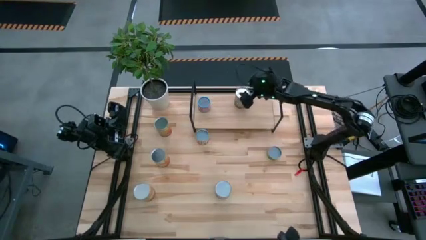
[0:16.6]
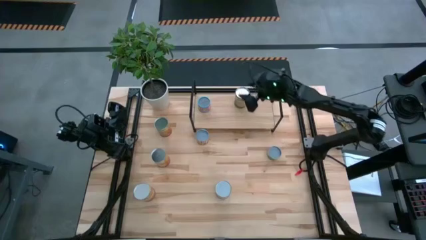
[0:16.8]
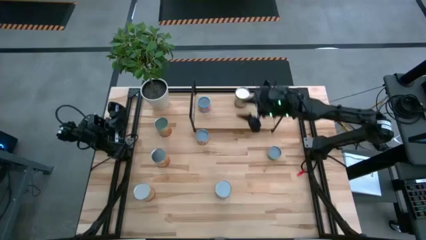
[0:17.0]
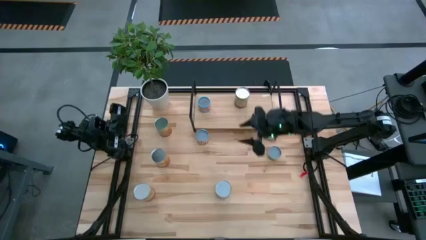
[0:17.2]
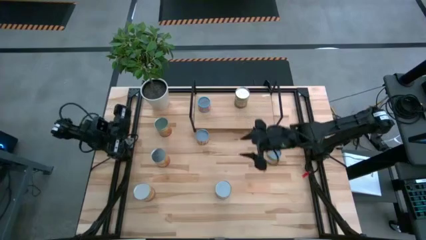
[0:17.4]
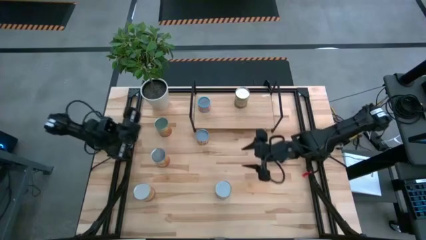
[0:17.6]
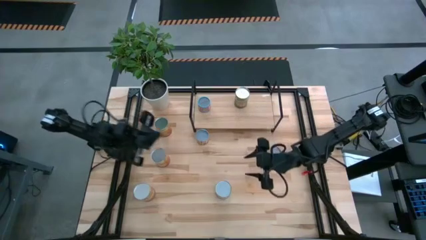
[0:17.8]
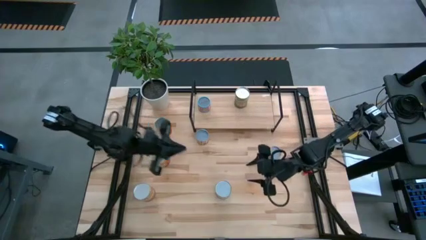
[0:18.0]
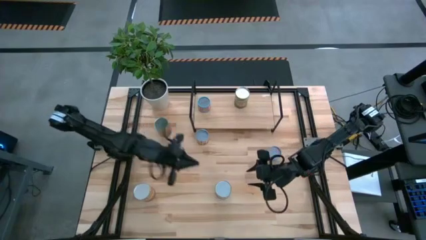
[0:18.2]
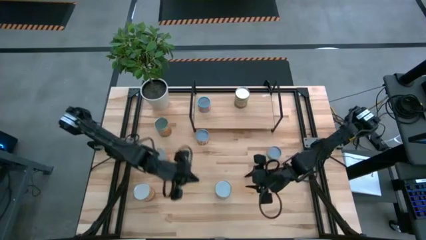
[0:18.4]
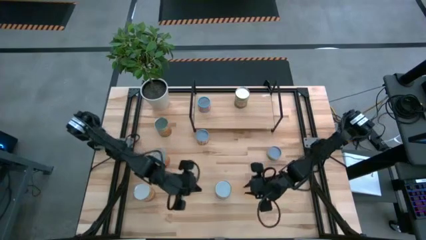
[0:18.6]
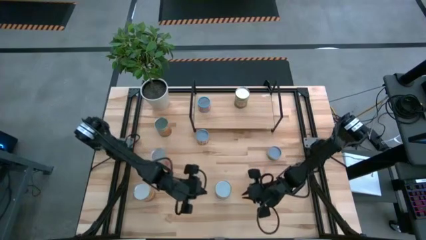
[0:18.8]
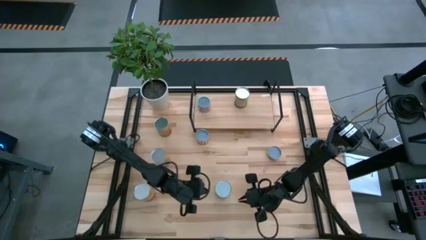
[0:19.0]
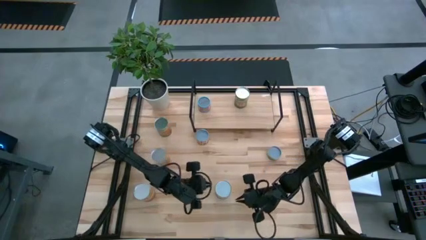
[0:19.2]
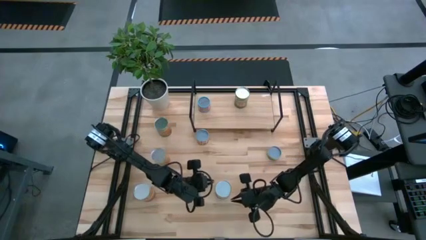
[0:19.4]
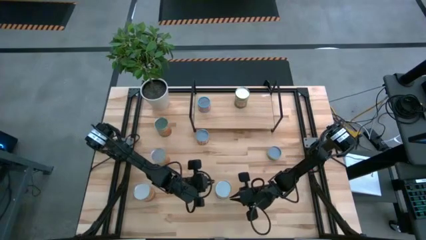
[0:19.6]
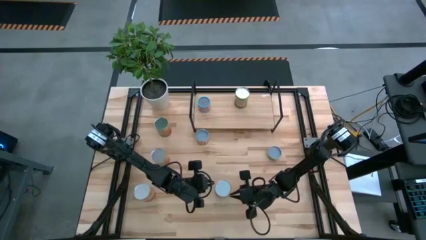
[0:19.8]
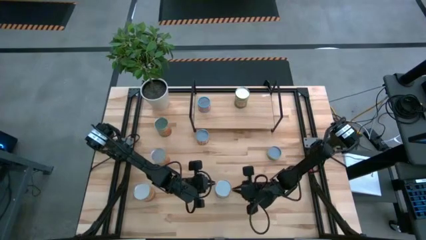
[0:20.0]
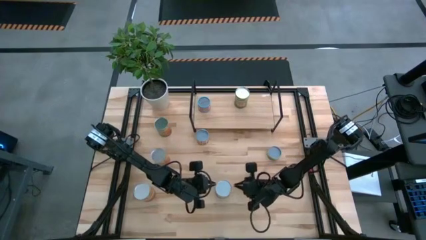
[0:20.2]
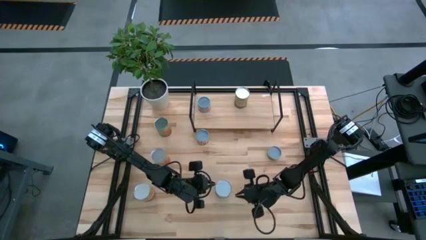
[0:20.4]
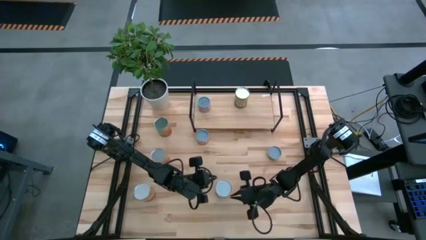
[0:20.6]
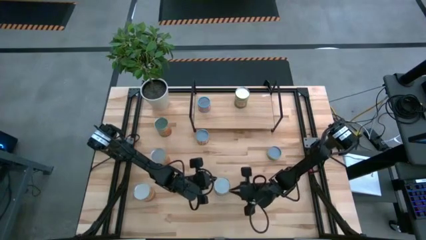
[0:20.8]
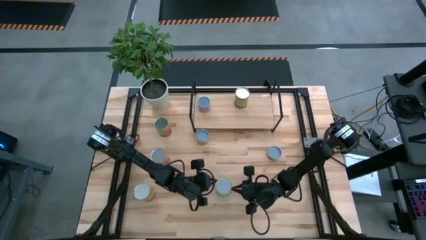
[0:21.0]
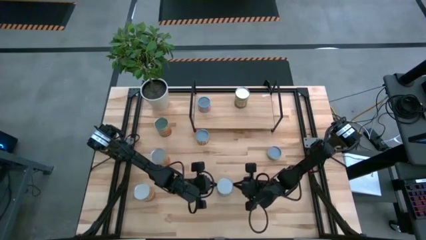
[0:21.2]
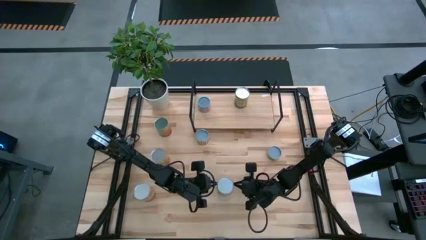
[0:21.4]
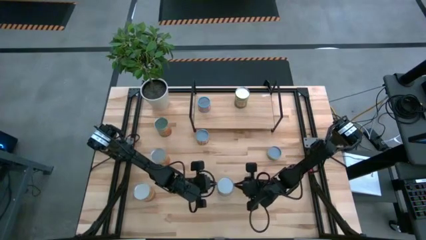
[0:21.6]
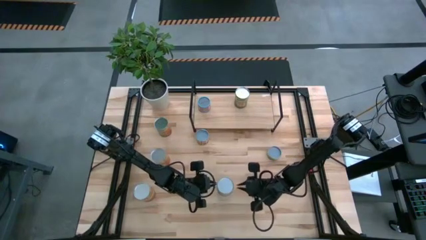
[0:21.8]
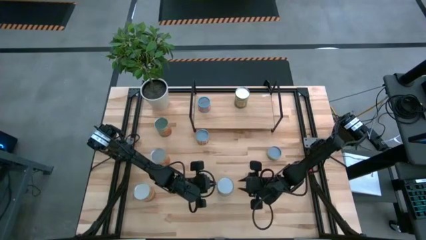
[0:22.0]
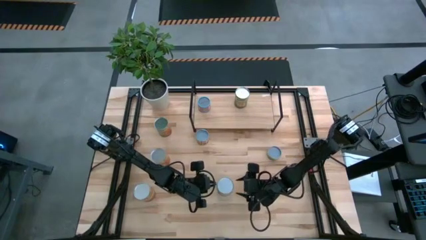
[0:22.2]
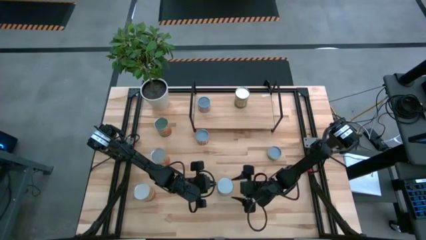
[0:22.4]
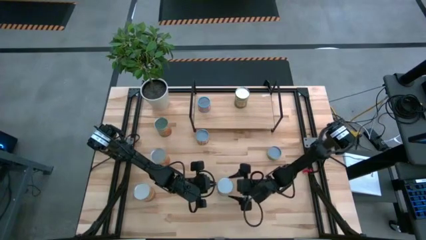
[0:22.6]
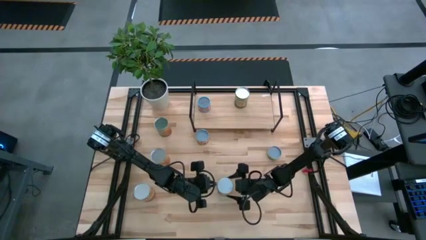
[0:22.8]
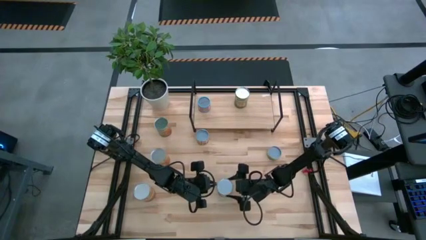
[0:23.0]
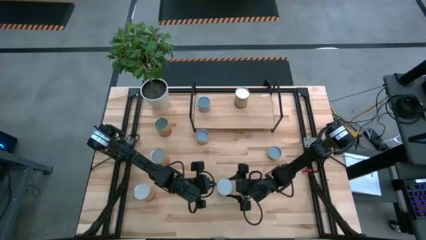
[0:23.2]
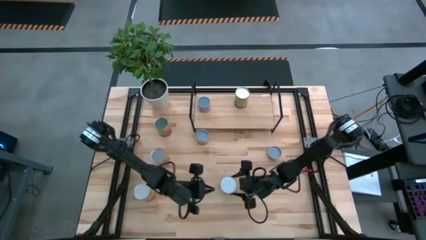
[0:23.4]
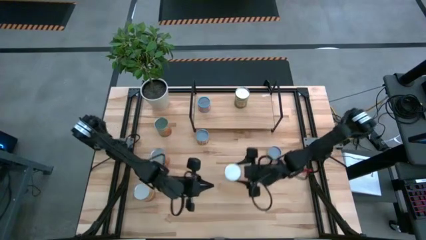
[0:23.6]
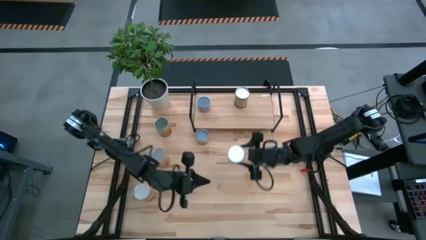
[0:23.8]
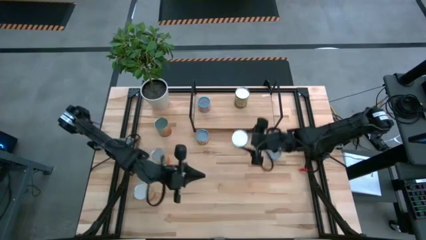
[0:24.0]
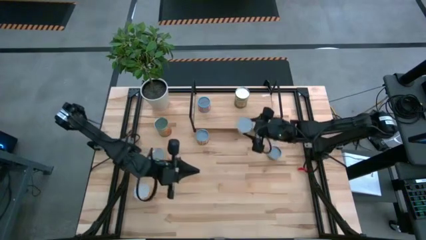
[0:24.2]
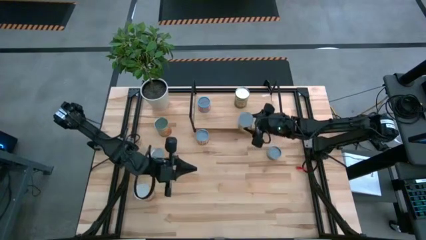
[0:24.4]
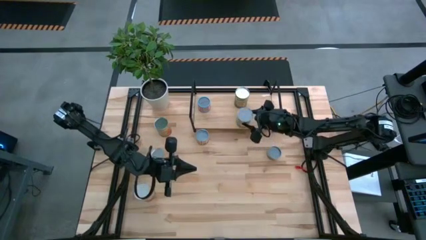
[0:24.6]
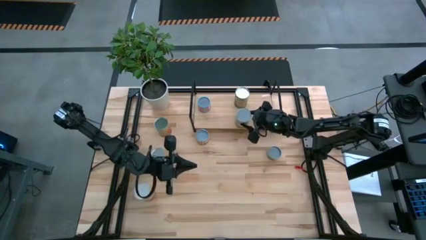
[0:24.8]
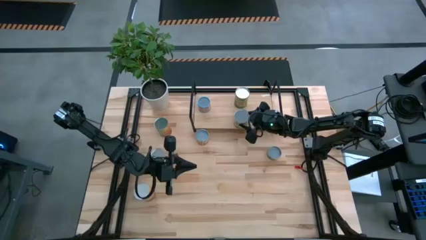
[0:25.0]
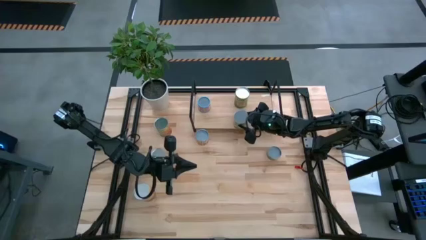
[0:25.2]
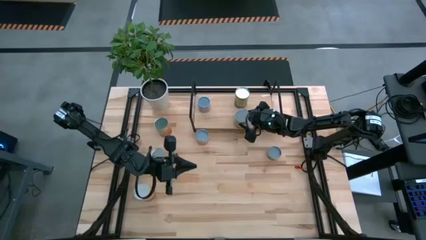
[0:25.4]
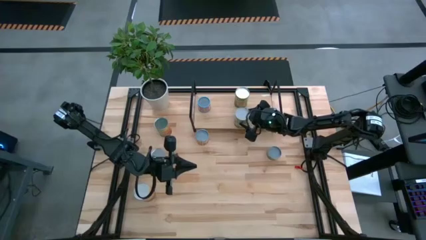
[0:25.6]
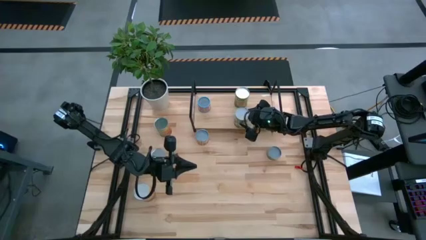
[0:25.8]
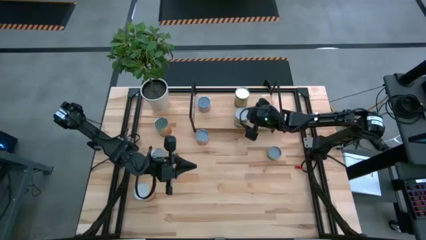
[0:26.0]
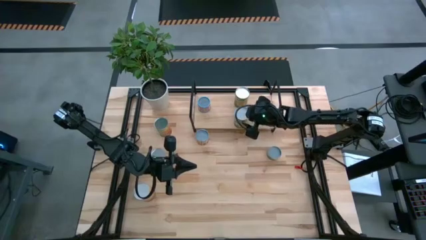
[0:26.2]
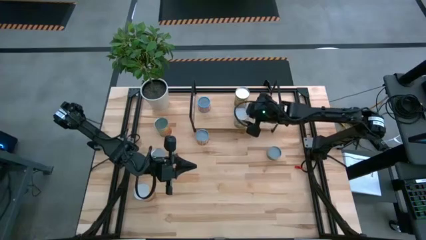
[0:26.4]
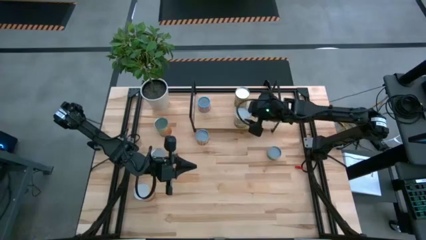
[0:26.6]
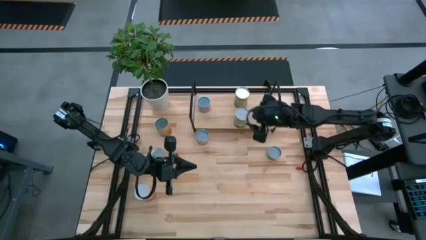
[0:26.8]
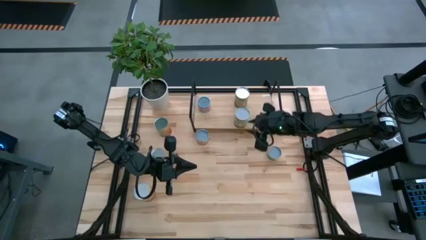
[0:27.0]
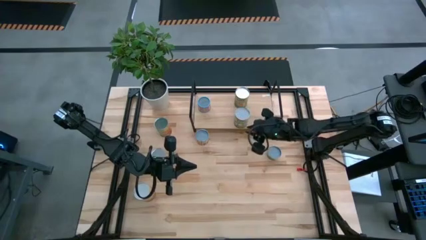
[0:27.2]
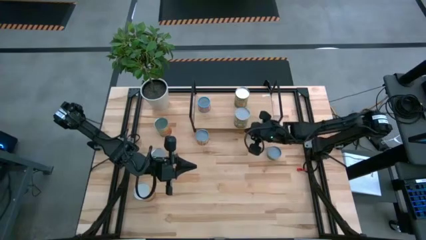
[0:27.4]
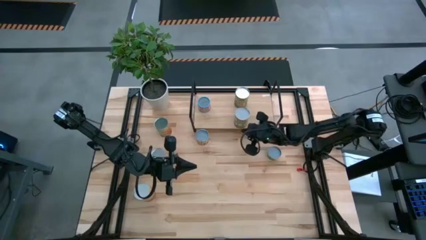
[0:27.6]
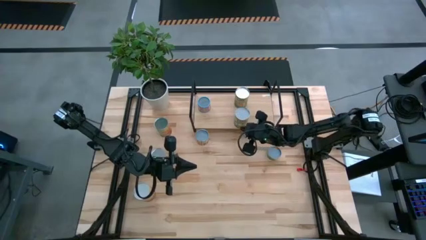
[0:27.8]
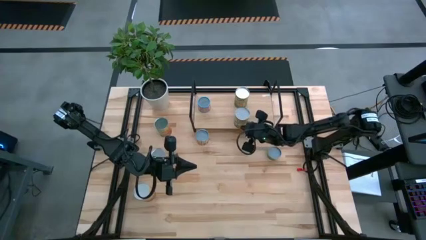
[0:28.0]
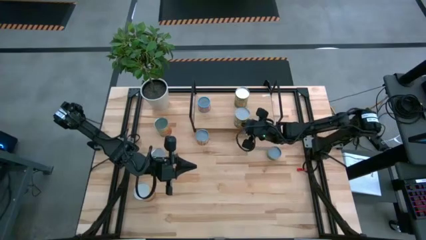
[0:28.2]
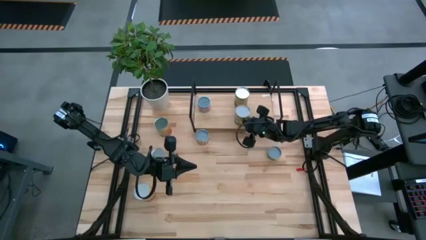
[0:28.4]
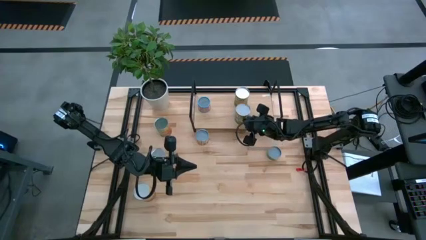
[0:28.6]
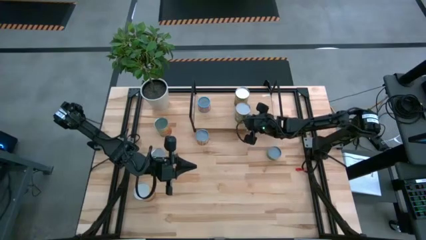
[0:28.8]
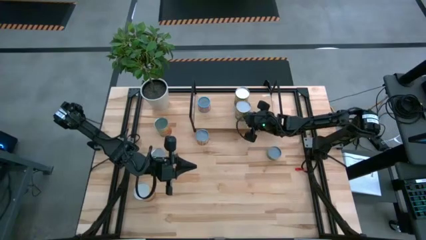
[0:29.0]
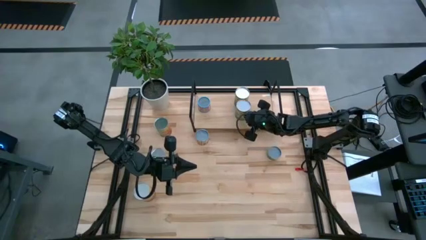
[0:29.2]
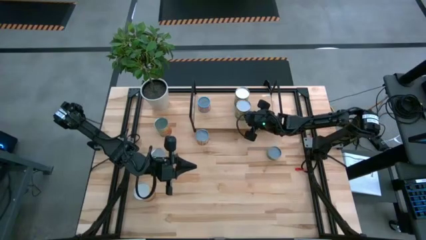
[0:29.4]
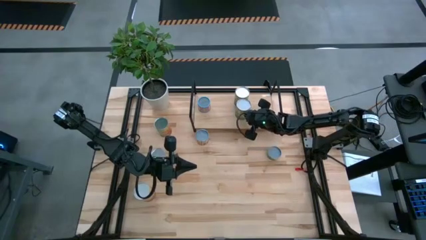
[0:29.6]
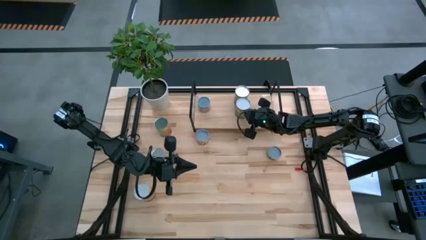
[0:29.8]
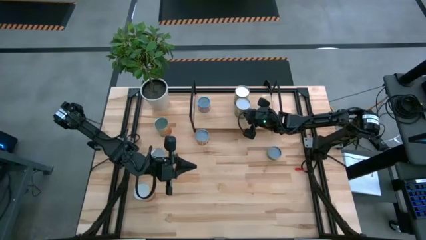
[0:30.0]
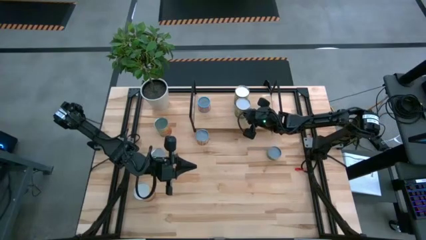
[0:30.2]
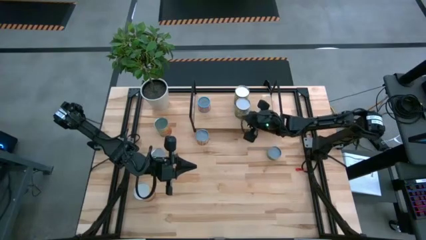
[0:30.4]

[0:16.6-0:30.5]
Task: Pick and place cans onto a shelf
Put the canned pears on the shelf
